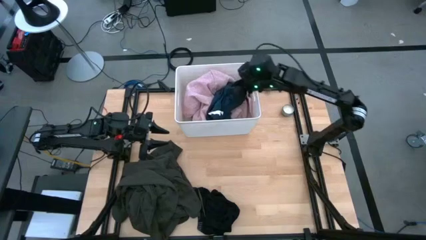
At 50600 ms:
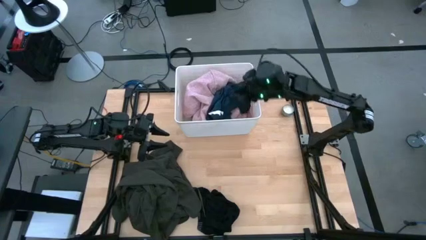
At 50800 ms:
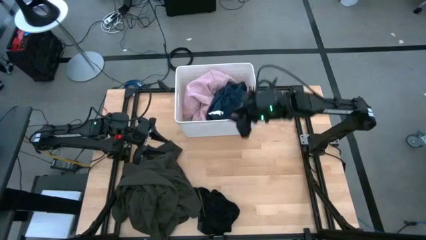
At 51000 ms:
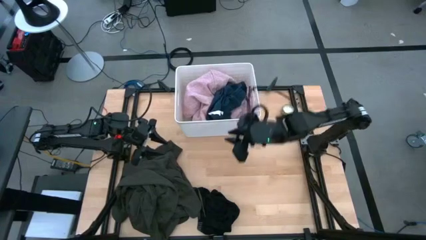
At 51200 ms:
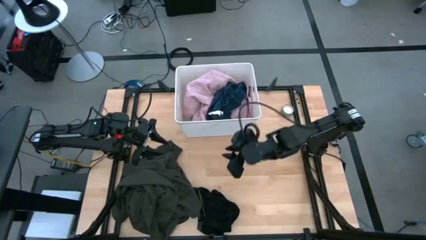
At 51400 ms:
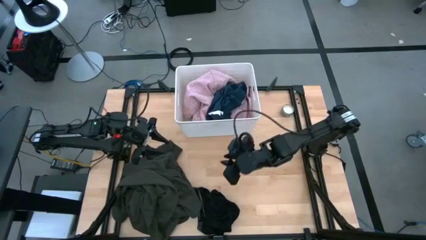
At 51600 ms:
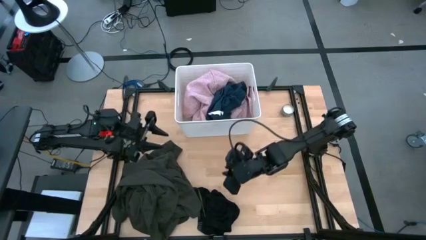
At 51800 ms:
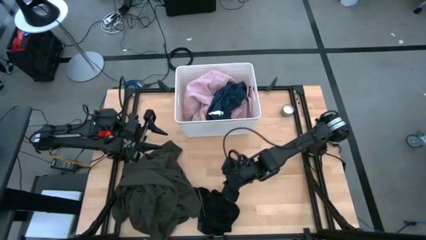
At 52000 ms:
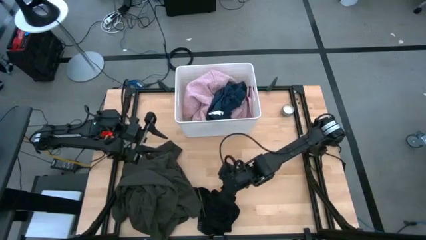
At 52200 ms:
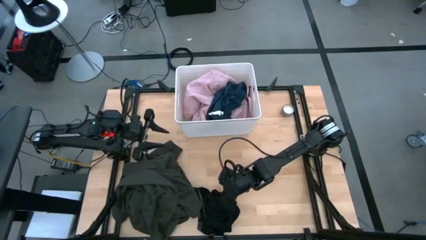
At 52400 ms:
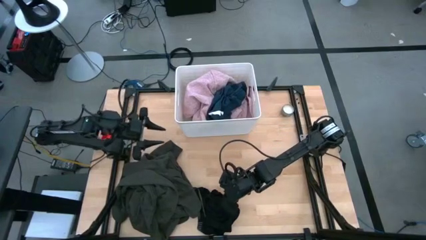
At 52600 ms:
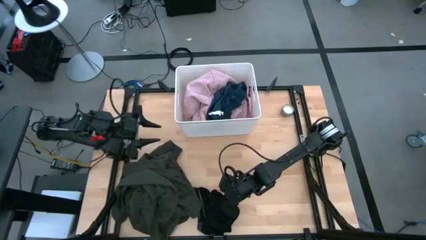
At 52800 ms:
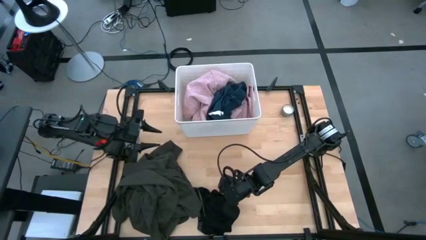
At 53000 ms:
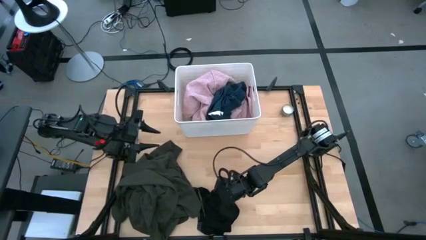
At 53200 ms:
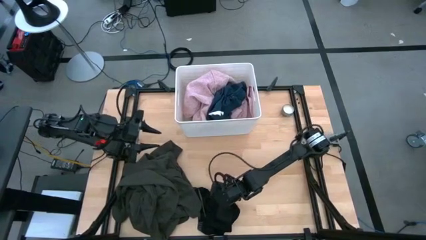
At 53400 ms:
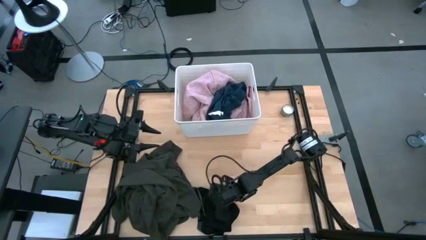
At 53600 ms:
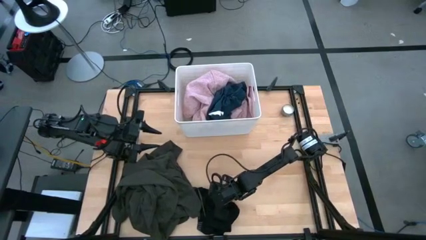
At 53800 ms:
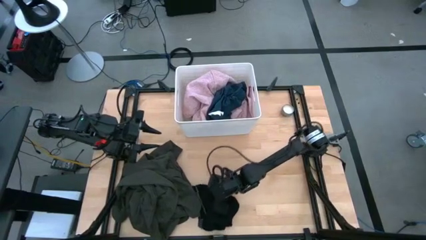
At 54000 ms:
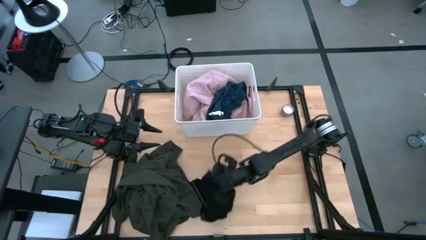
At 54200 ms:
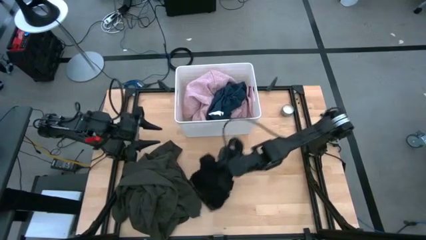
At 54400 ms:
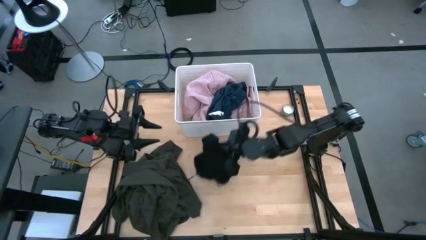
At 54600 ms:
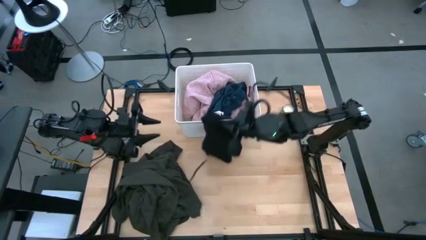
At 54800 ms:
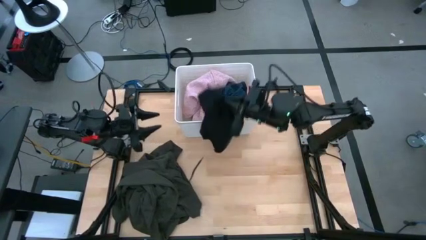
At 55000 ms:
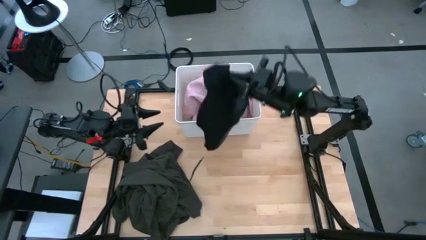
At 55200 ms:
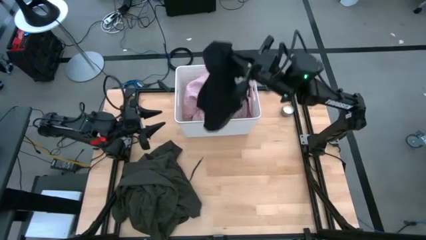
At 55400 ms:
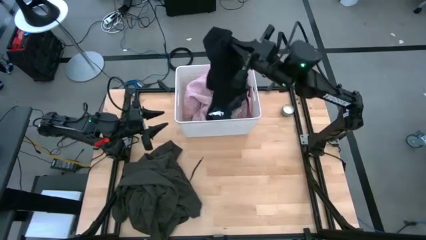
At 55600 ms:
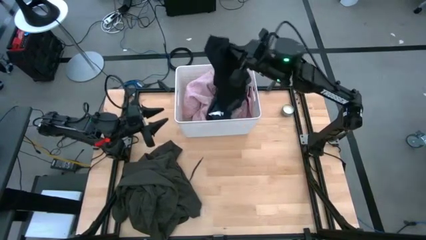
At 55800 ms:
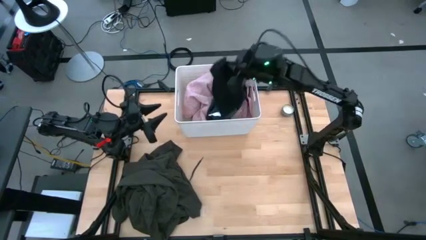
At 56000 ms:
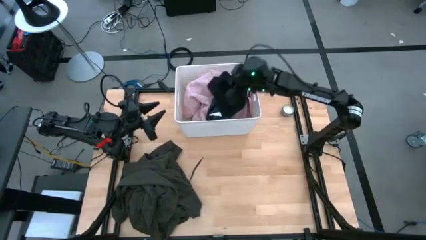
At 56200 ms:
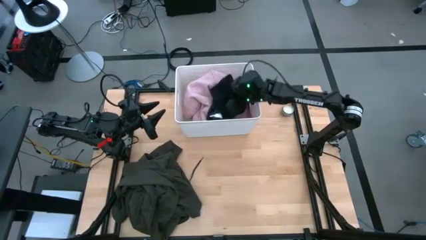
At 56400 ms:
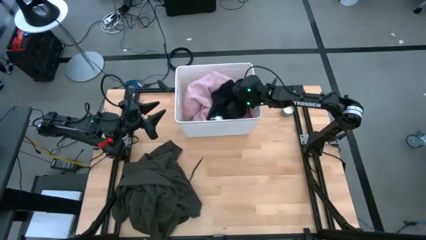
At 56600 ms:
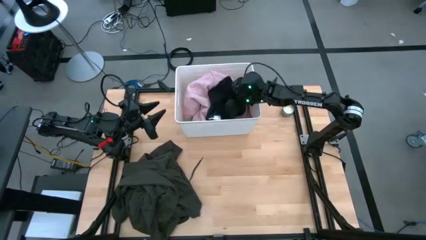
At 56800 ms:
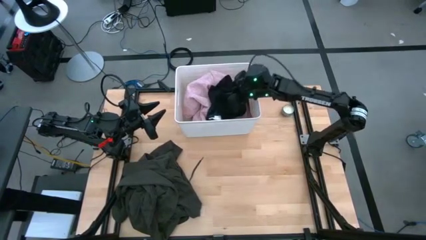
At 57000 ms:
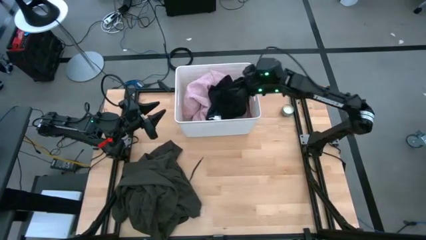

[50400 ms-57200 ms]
Task: Sort clothes
Put the black underwear into the white bin

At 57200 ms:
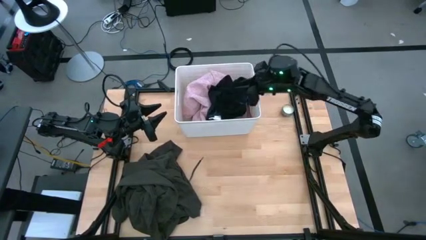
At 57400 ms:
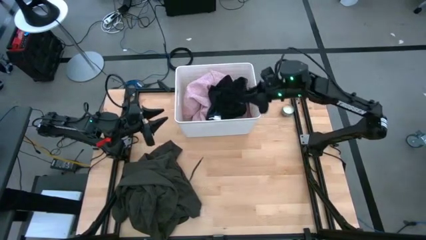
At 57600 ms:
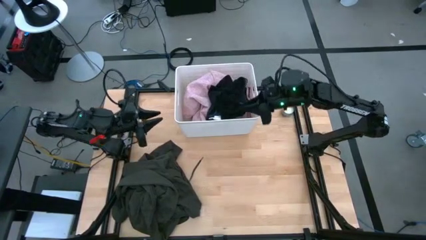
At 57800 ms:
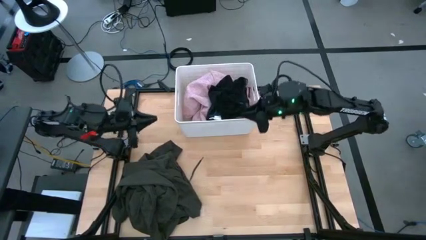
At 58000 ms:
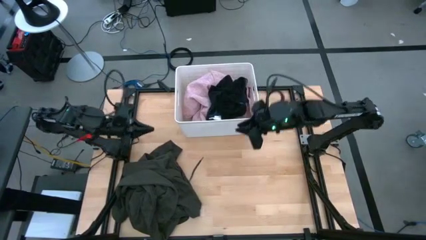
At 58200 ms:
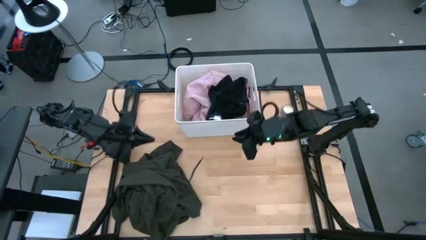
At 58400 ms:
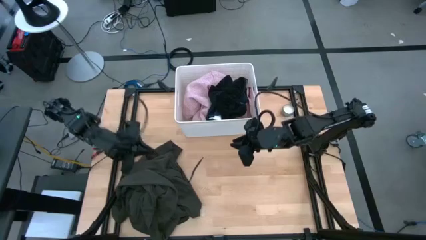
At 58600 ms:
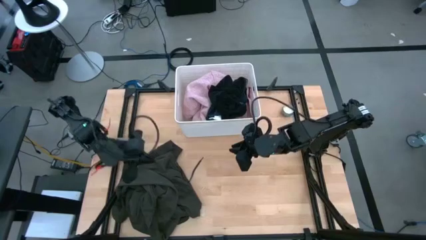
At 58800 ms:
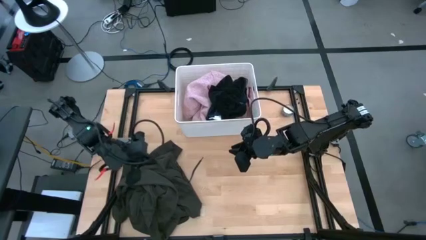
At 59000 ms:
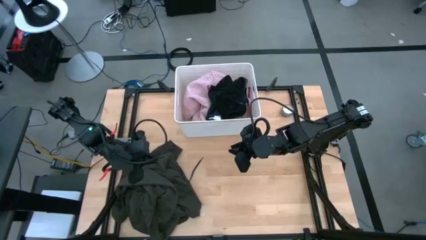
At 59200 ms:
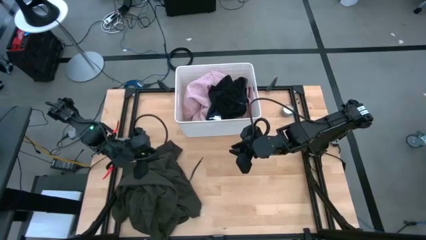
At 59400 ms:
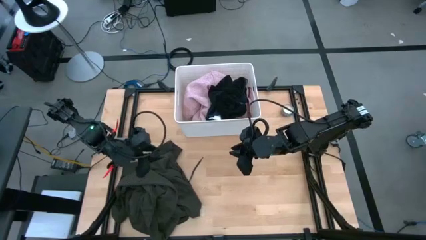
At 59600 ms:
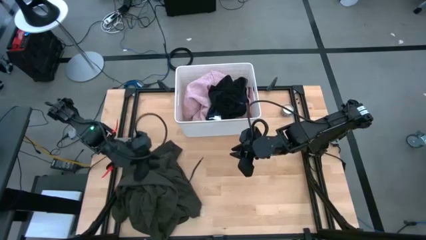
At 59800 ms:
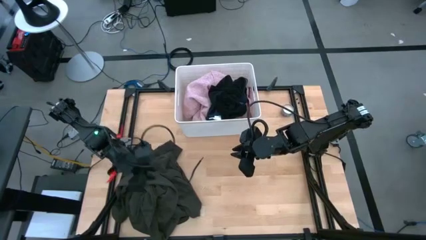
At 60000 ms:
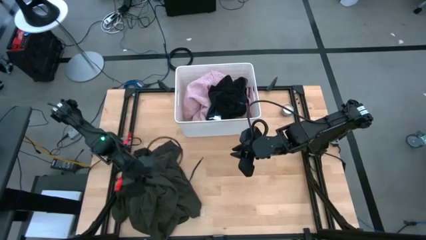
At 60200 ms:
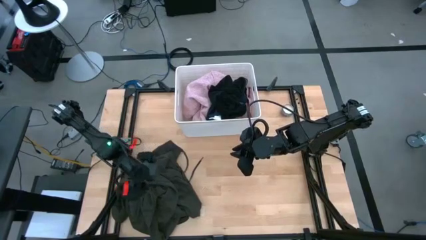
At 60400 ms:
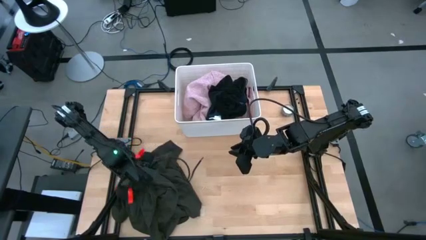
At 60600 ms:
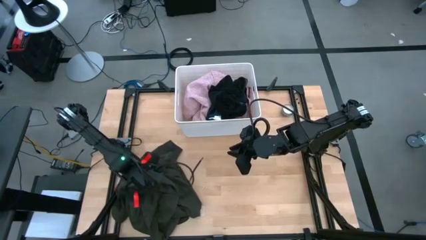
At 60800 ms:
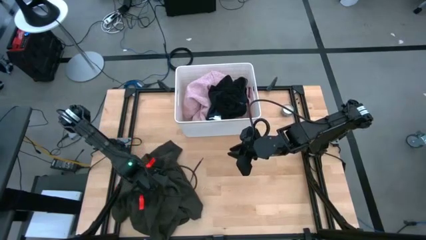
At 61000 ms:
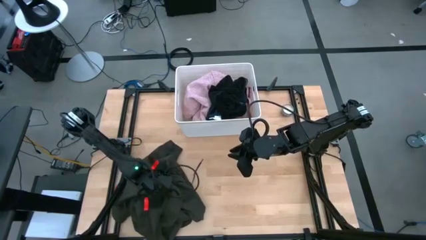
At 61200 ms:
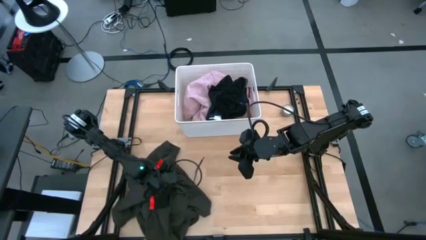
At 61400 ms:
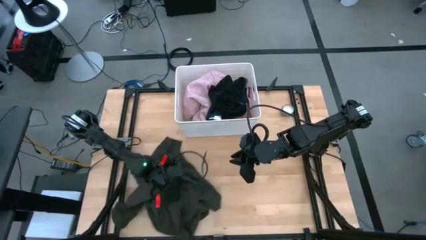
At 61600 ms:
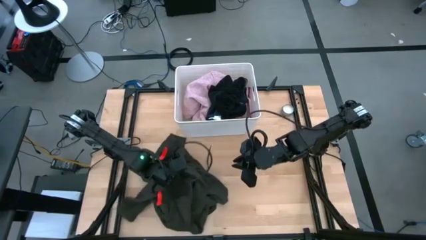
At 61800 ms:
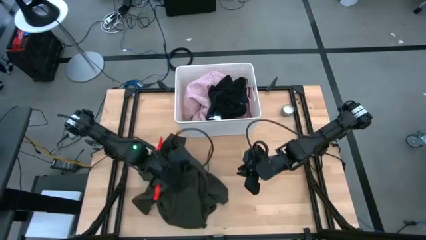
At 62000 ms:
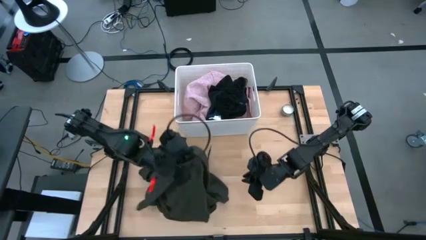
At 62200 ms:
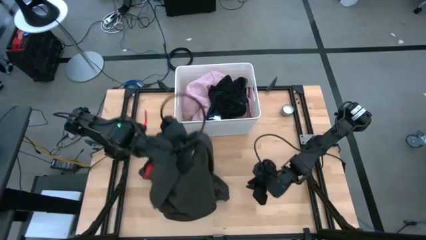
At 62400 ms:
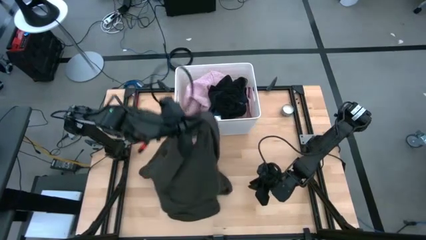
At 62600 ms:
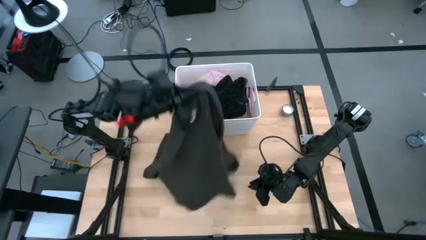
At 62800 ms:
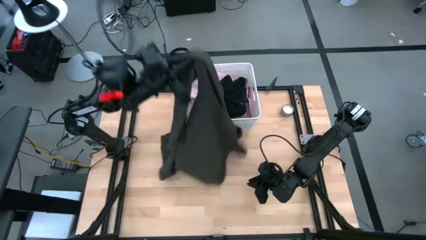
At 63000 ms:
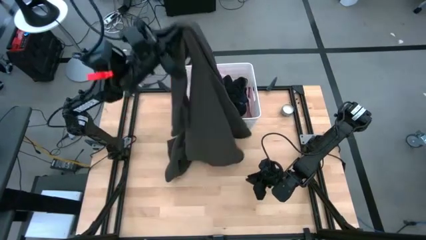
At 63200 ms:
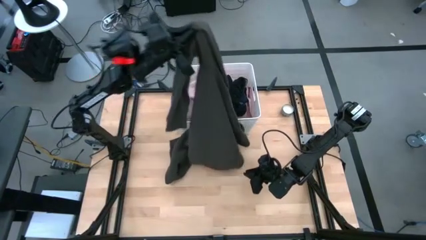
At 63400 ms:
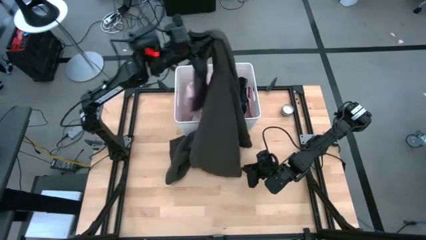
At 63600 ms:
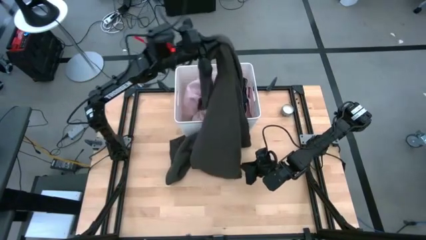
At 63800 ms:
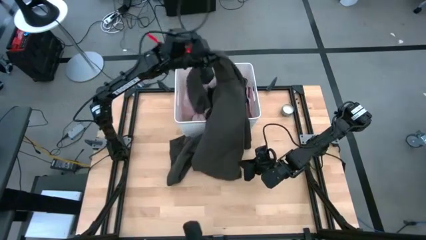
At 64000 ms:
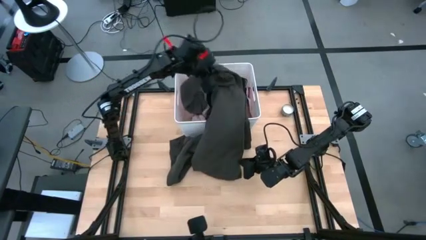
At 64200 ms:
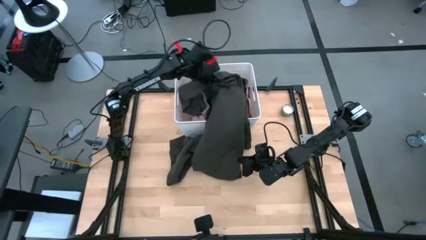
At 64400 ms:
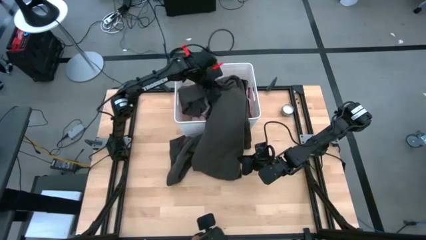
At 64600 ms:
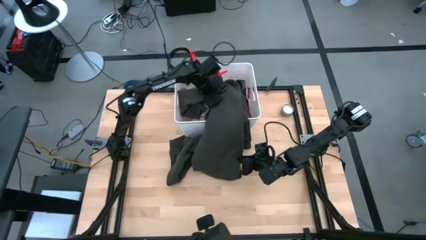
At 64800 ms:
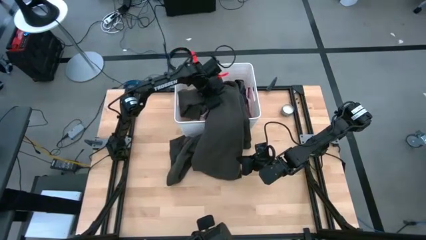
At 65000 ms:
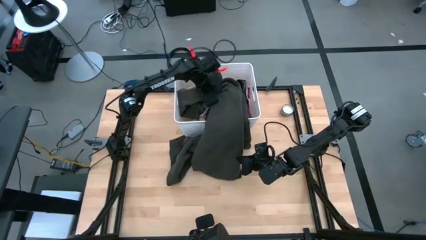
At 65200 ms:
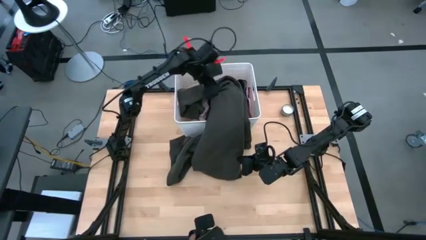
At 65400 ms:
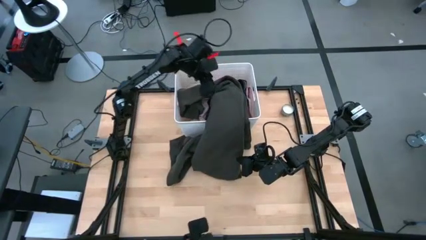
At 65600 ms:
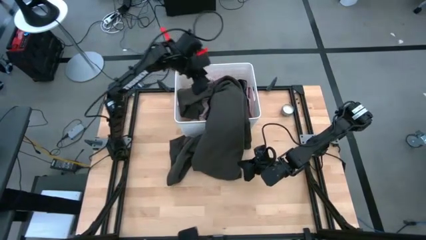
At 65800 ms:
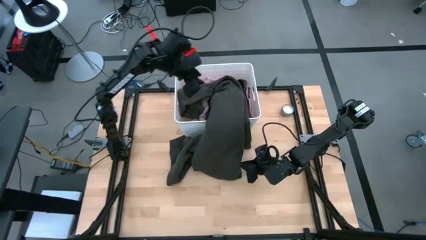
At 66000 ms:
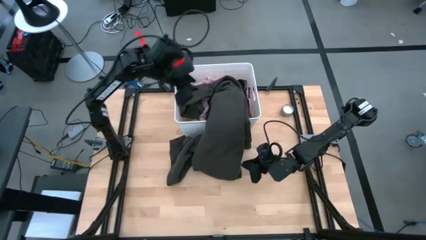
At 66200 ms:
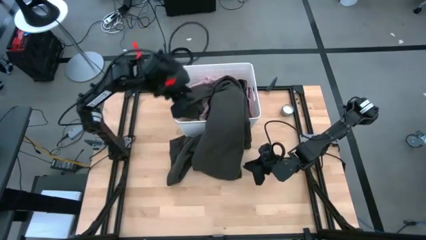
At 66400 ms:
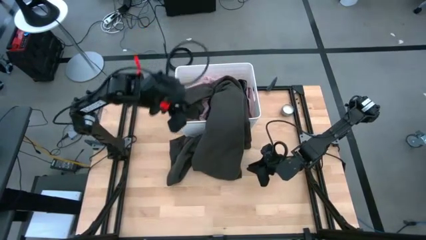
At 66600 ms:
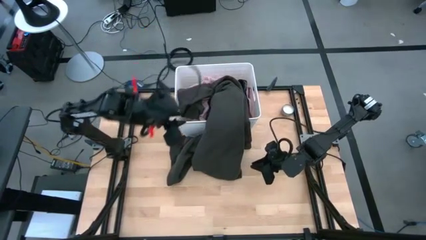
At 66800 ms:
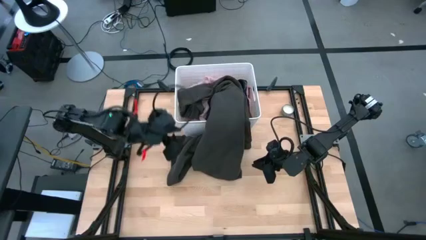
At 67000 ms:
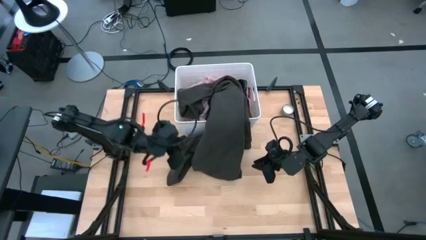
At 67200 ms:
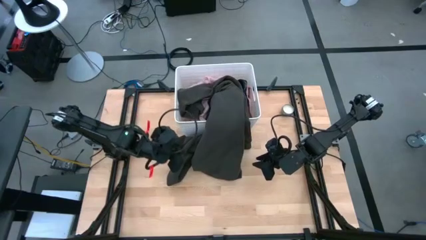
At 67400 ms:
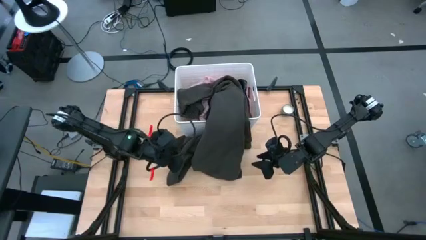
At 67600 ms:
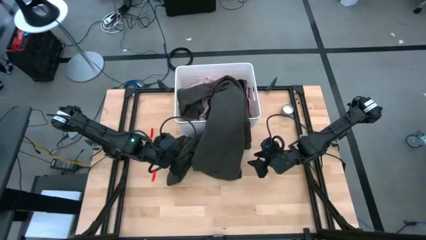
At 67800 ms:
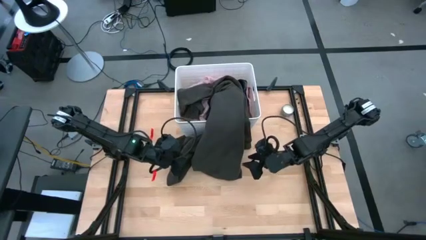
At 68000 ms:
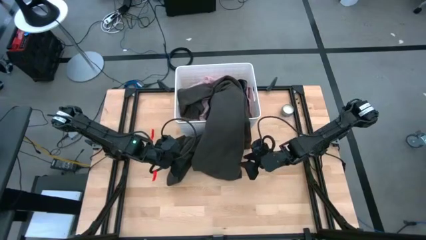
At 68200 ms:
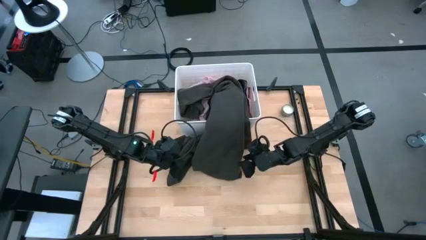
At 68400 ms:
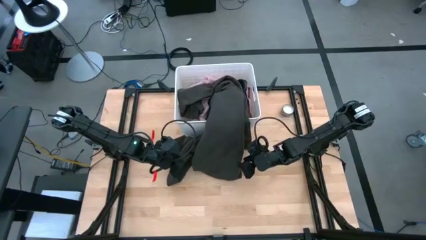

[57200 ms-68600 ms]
Put the green hoodie into the white bin
